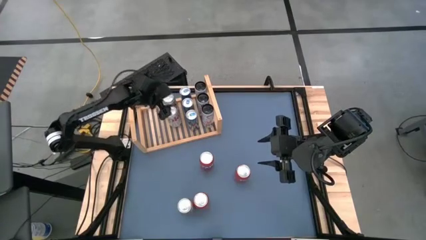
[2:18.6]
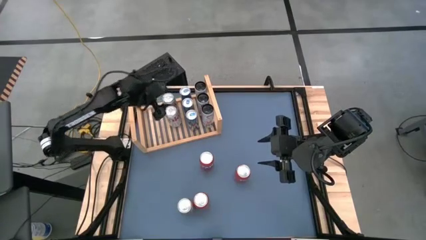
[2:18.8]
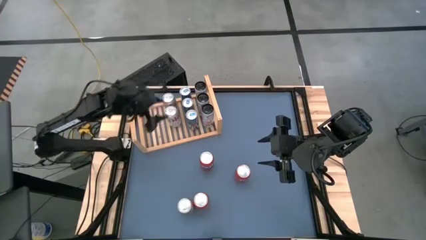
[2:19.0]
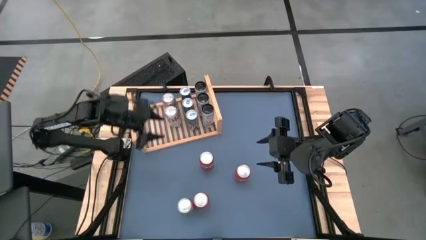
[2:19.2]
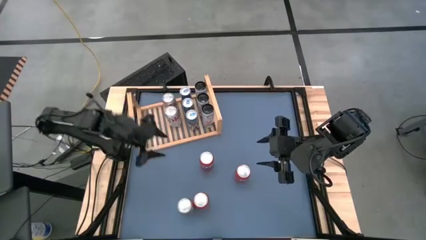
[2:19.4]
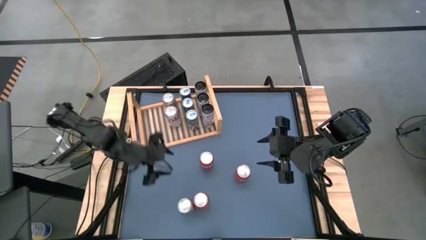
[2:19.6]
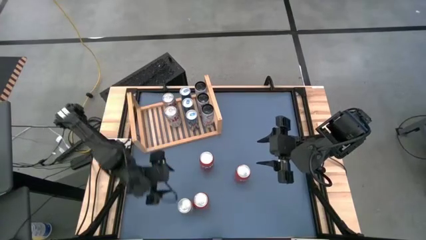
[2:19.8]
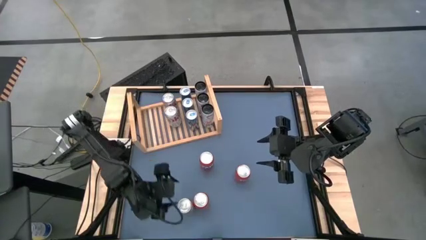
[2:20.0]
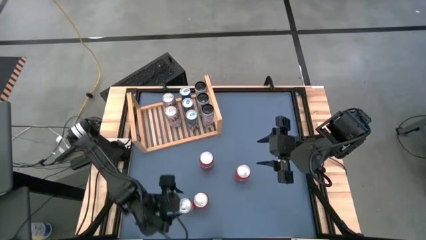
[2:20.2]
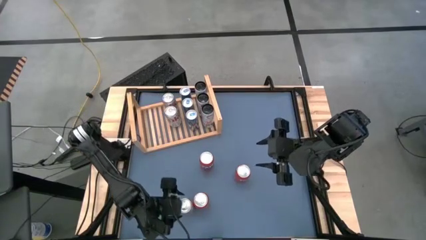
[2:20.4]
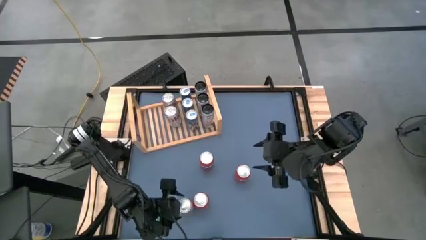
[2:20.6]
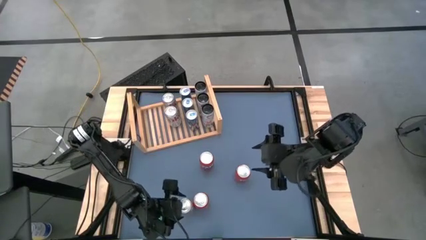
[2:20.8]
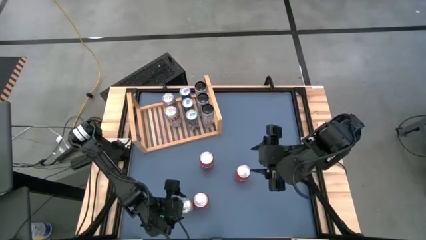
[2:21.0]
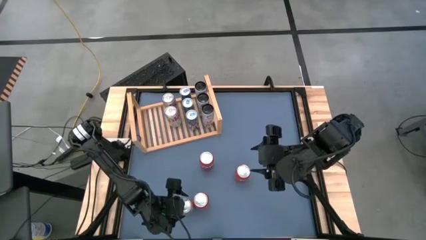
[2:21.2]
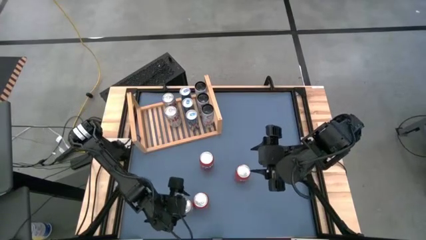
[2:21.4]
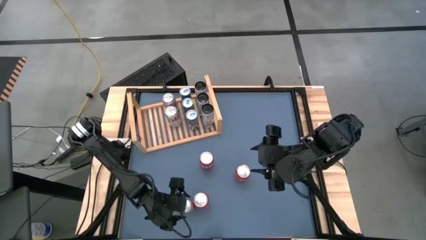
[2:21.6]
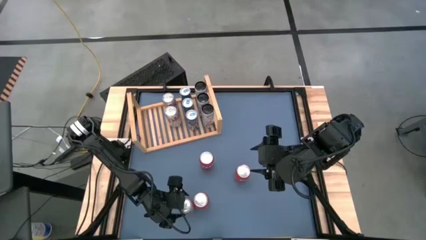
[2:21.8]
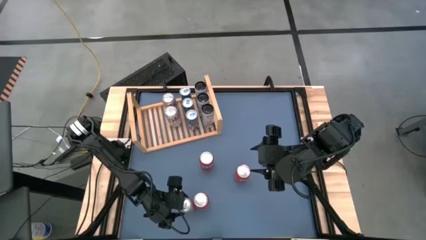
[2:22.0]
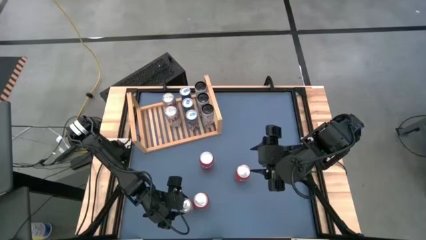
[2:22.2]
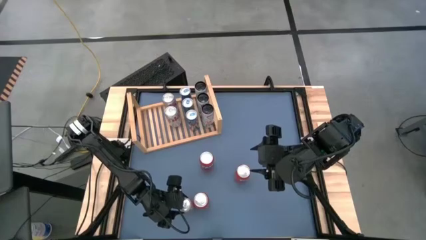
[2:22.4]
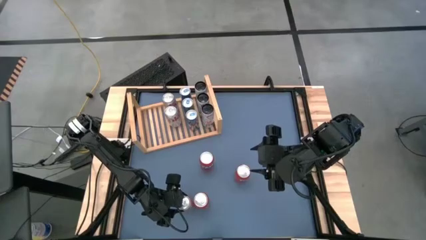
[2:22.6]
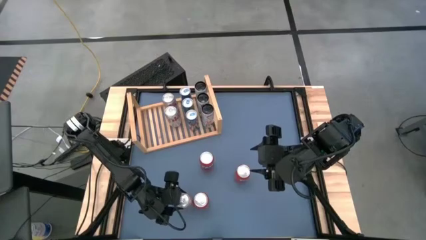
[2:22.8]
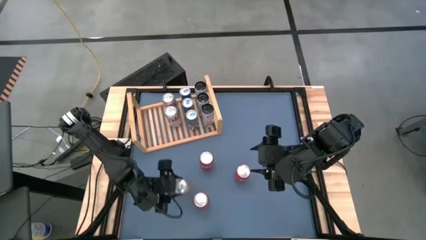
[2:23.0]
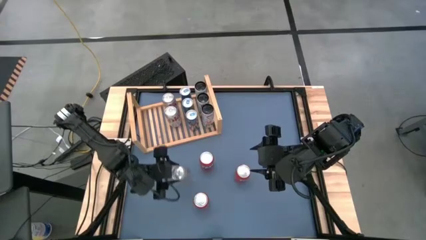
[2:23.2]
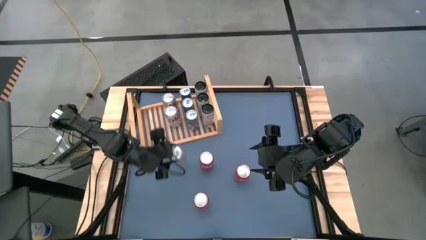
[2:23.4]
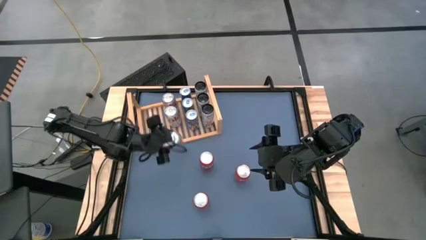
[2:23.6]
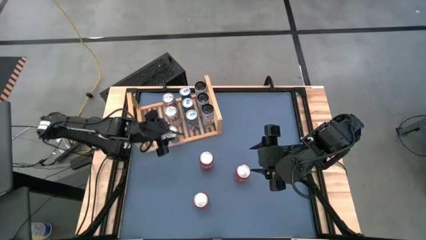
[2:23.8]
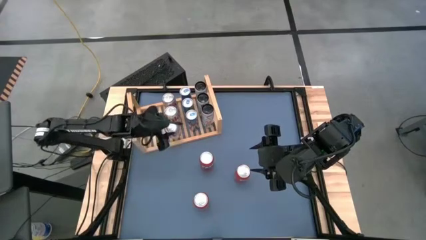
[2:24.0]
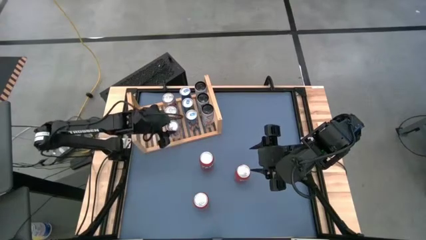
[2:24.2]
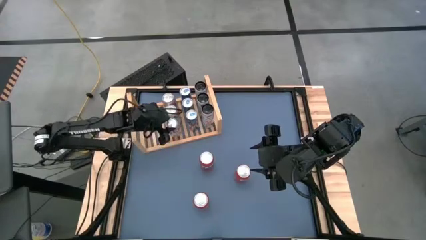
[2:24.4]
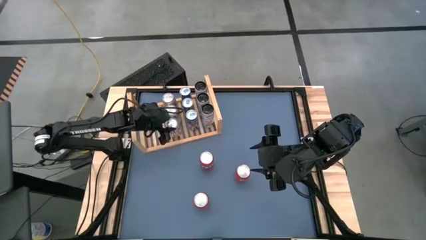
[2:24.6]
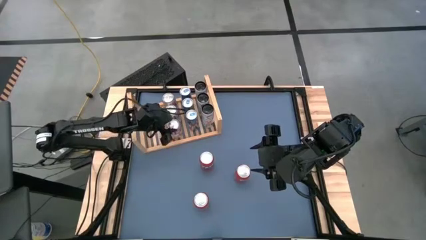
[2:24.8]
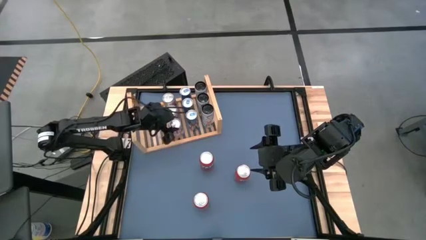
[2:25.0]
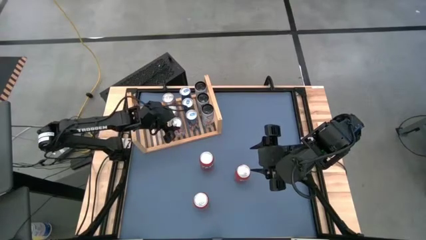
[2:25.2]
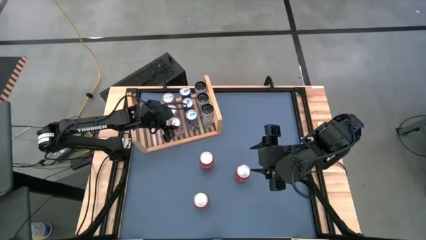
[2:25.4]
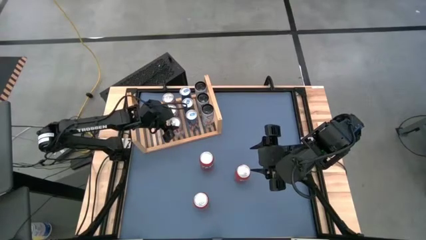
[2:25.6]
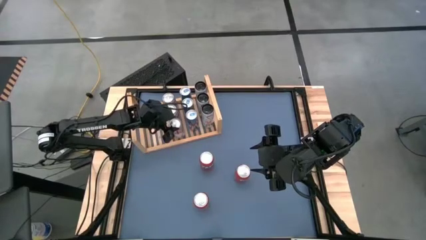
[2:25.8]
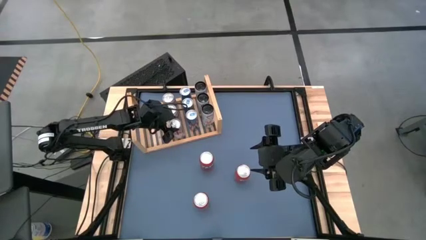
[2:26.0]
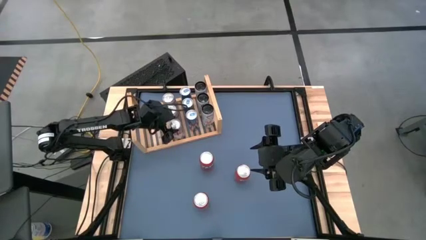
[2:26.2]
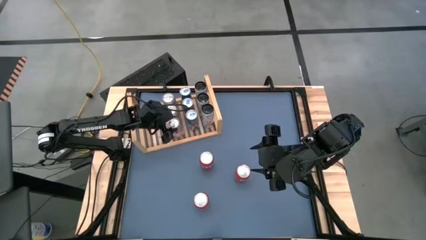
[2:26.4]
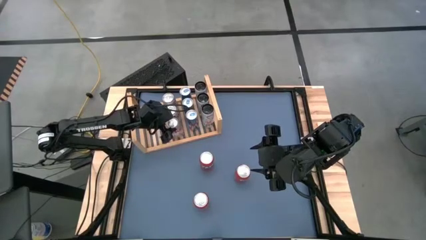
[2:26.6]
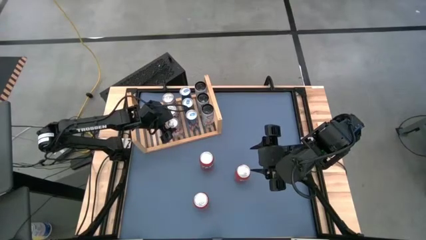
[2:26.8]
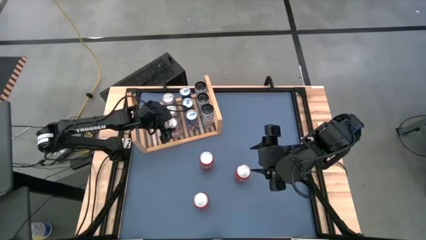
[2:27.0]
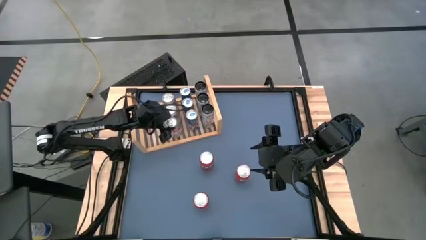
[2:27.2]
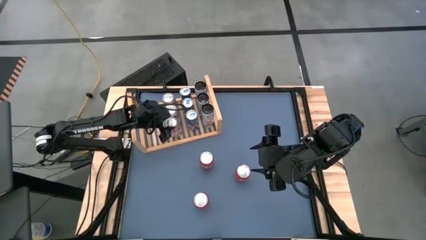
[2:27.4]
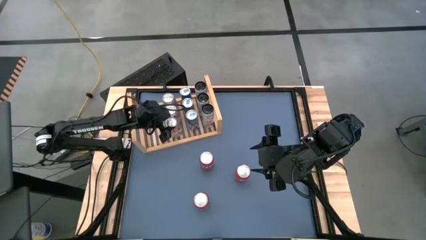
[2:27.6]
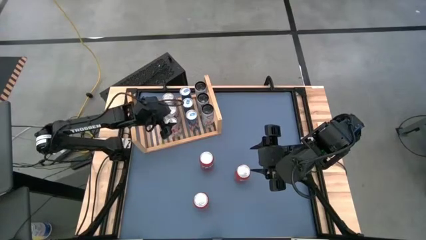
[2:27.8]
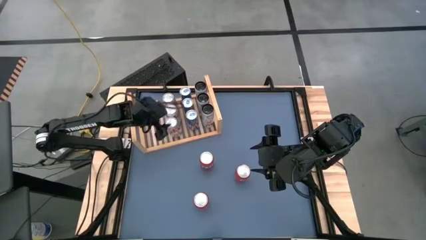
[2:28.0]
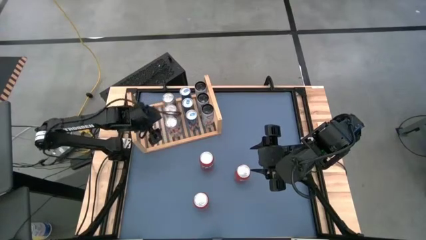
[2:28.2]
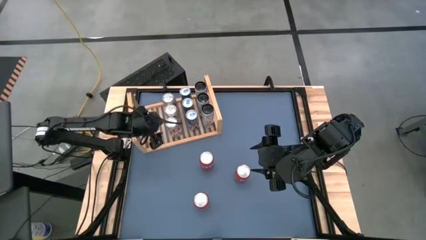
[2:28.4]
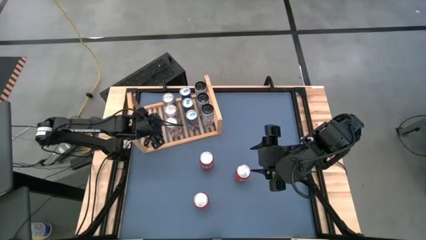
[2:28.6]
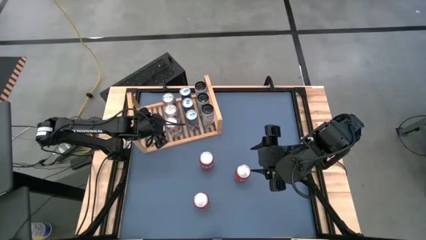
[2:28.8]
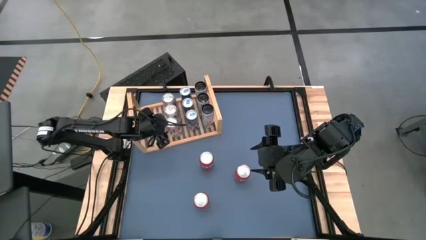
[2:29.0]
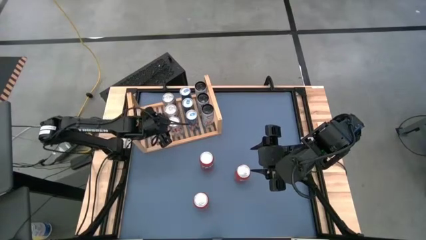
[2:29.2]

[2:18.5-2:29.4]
Task: Place canned beverage on shelf
Put the silver soda can on the shelf aligned with the other silver soda cans

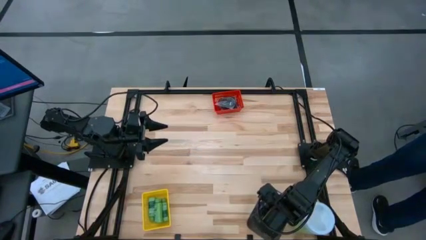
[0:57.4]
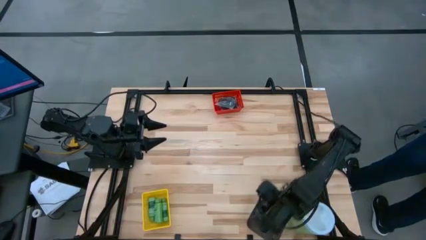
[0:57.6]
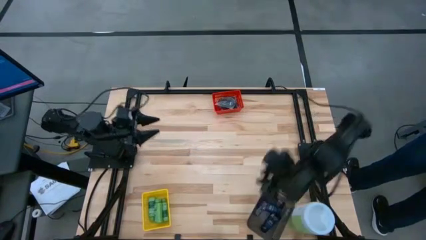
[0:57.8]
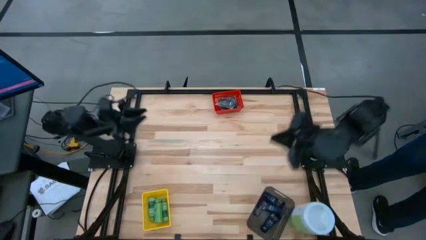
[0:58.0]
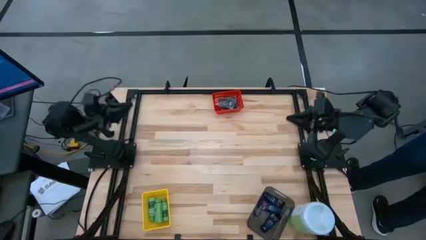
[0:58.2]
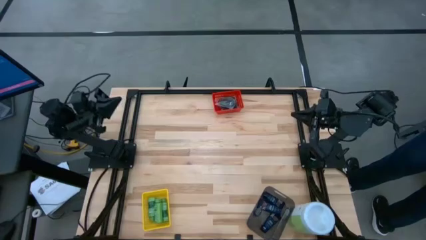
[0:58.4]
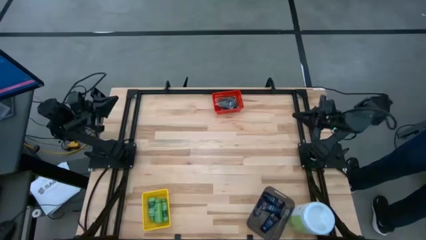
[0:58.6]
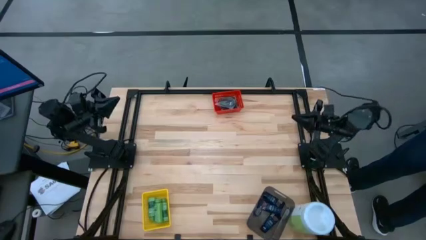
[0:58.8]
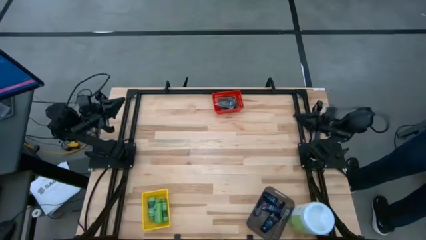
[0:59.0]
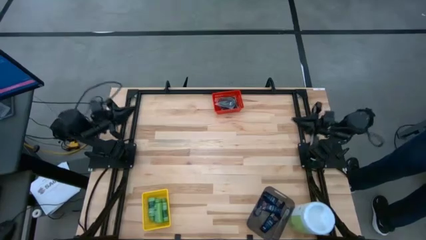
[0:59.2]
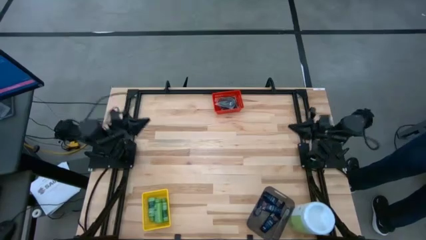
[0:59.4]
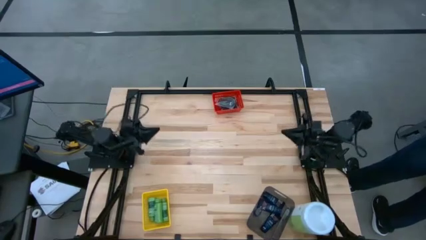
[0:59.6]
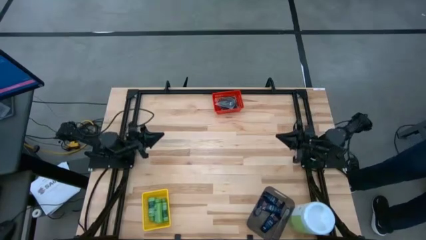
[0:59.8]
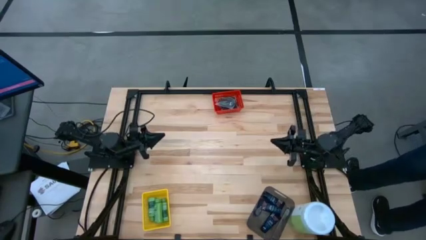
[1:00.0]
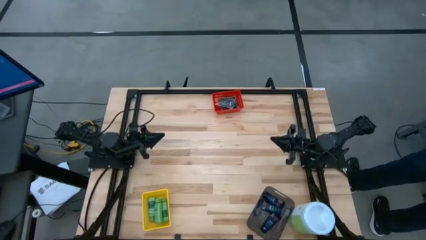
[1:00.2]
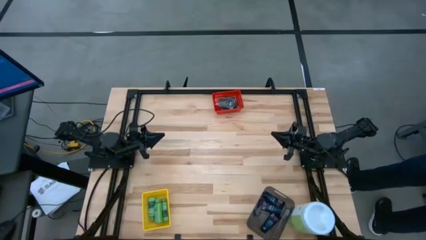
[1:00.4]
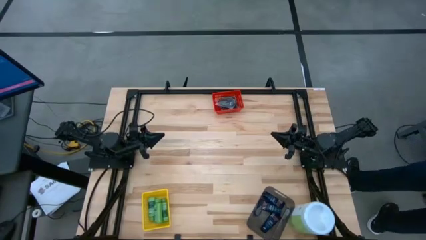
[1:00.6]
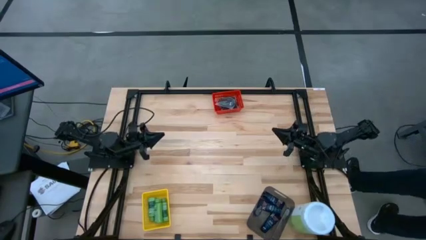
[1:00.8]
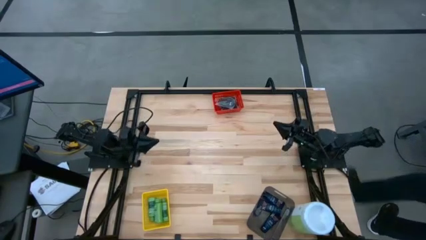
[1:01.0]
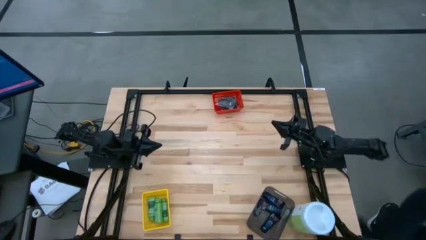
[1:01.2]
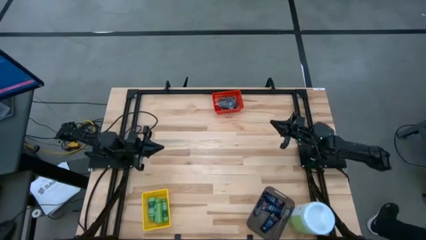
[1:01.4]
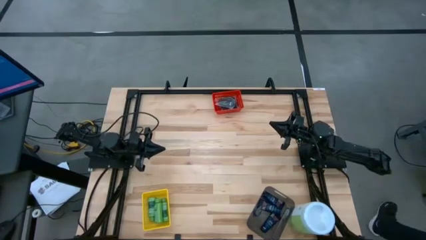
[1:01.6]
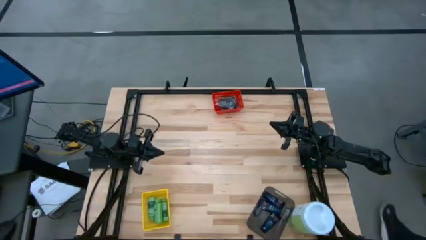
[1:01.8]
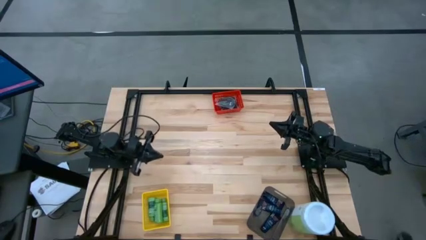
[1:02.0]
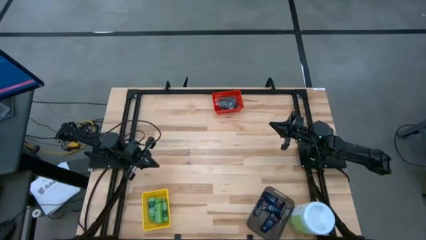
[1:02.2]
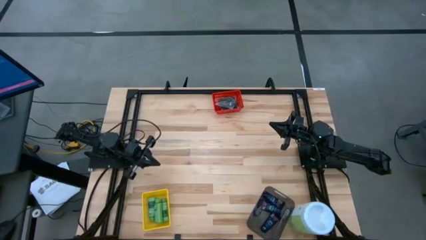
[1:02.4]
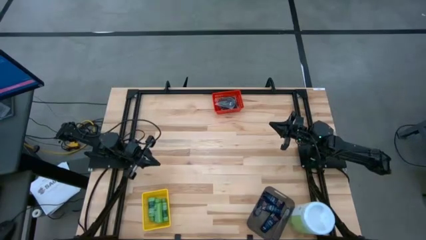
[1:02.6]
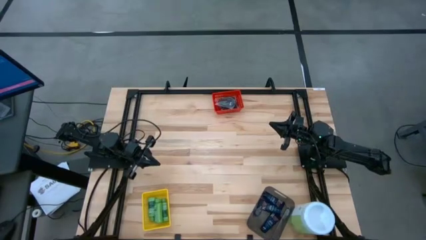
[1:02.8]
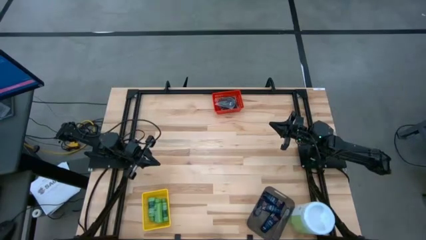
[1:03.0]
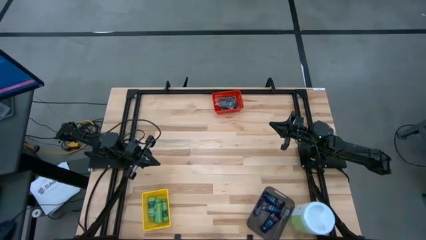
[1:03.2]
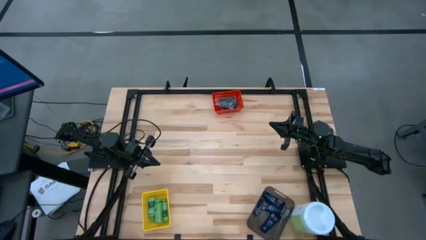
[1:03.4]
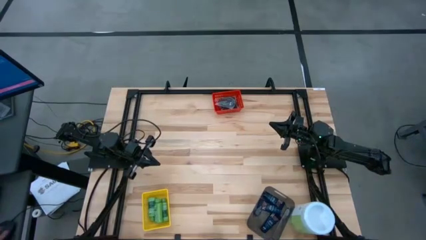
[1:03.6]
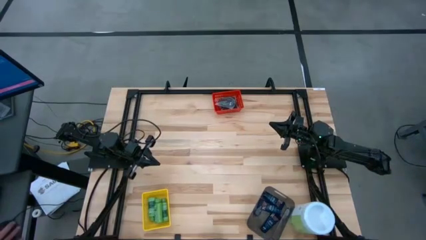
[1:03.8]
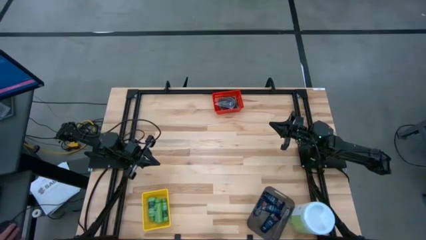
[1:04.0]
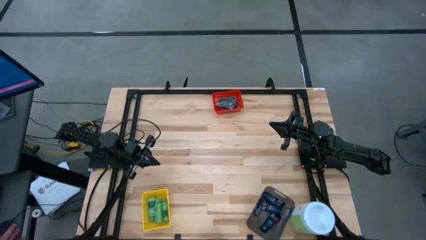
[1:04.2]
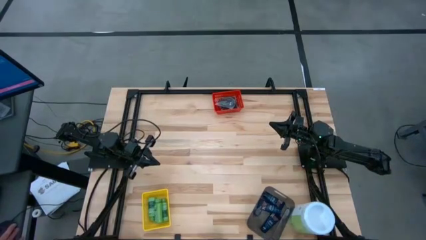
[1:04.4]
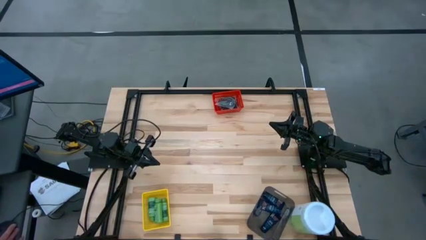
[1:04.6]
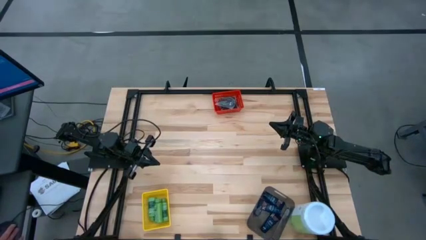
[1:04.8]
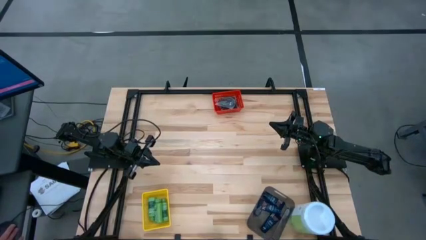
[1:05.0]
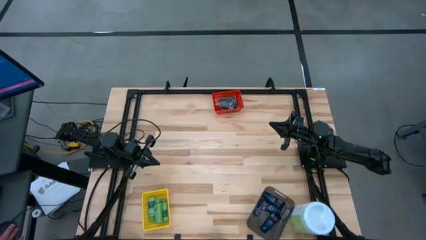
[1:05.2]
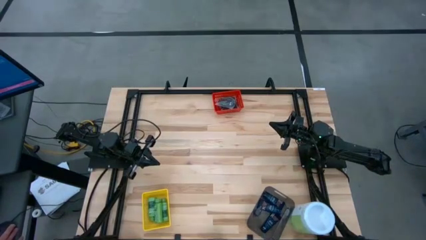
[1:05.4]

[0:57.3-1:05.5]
Task: Pick & Place Travel size toiletries
Return to Home Position
